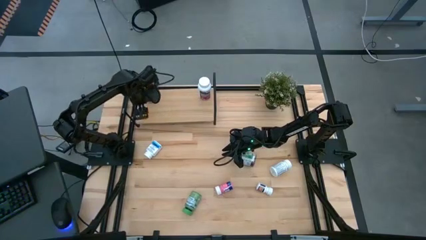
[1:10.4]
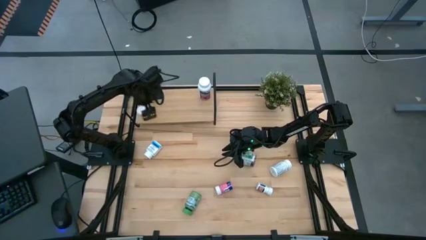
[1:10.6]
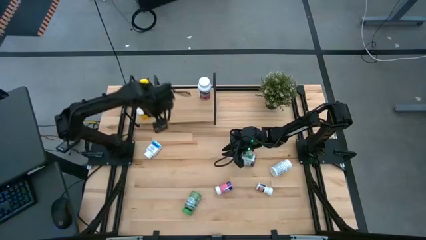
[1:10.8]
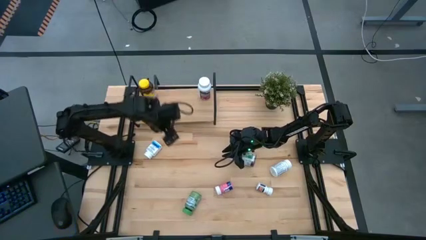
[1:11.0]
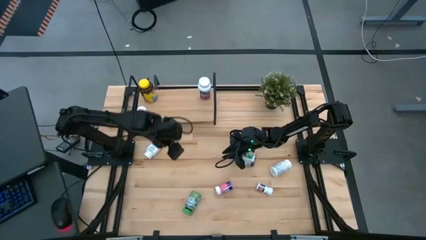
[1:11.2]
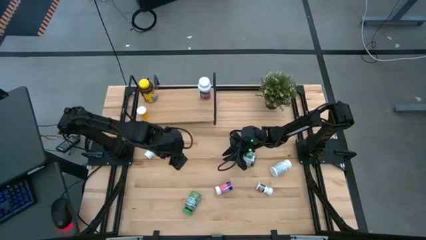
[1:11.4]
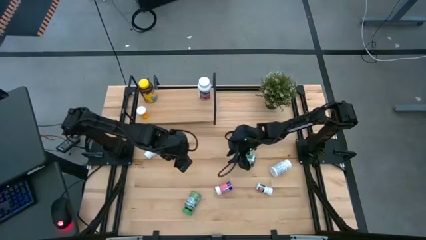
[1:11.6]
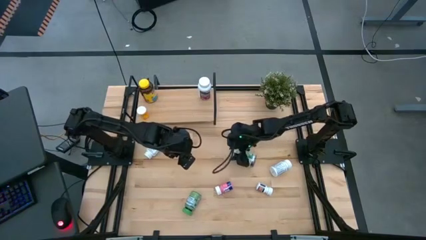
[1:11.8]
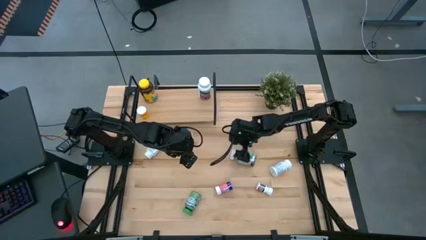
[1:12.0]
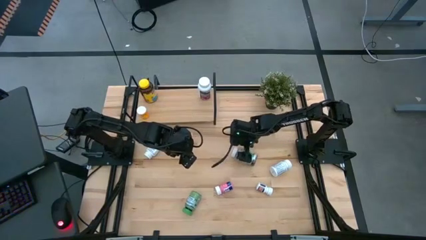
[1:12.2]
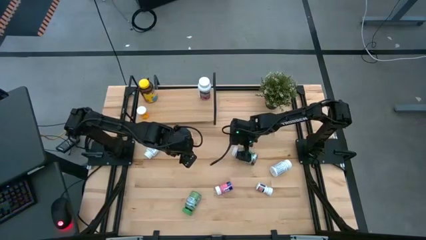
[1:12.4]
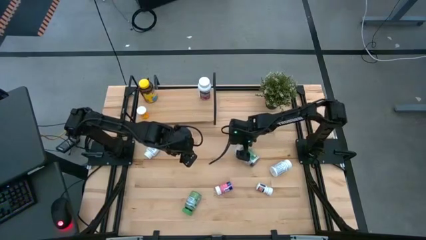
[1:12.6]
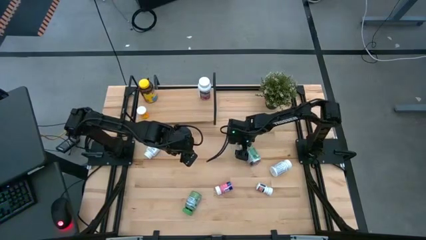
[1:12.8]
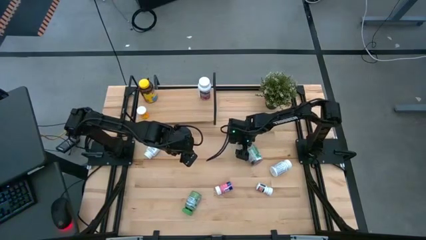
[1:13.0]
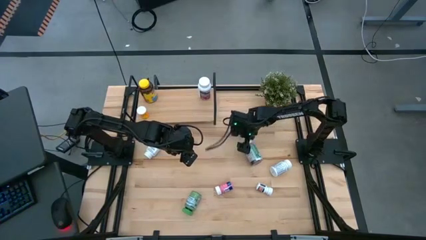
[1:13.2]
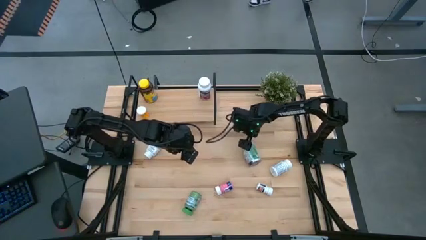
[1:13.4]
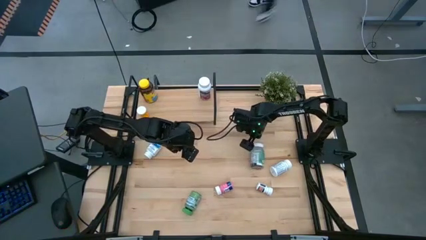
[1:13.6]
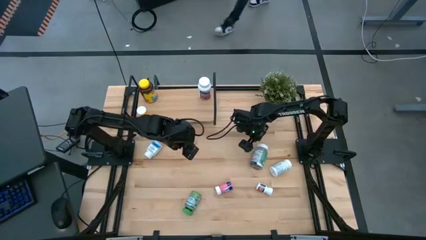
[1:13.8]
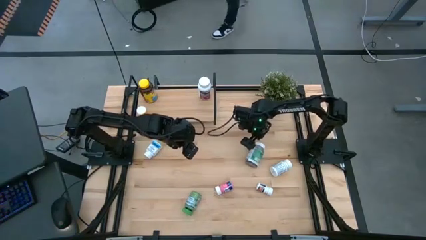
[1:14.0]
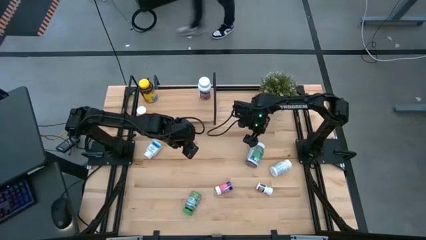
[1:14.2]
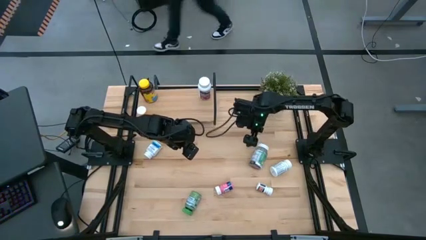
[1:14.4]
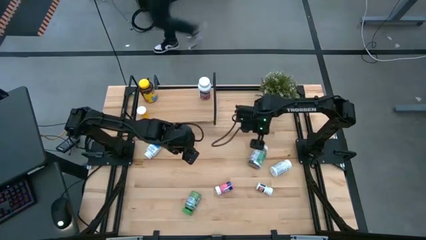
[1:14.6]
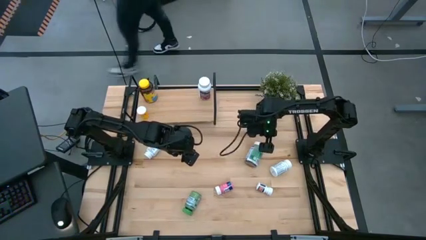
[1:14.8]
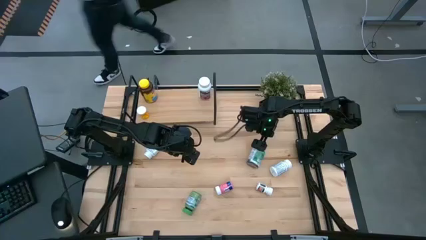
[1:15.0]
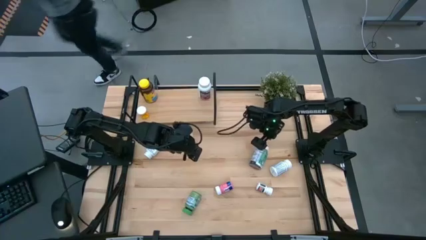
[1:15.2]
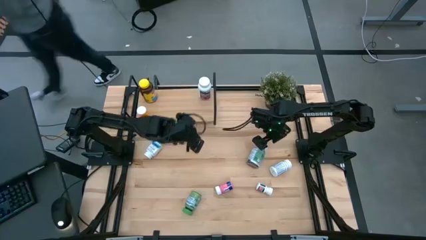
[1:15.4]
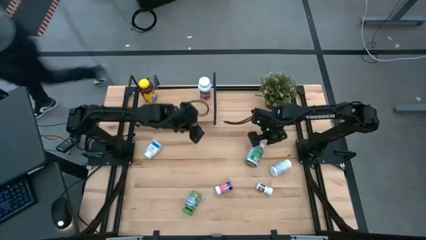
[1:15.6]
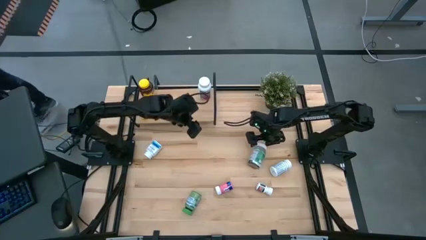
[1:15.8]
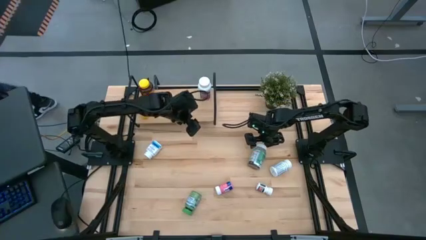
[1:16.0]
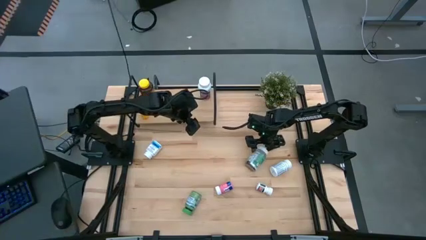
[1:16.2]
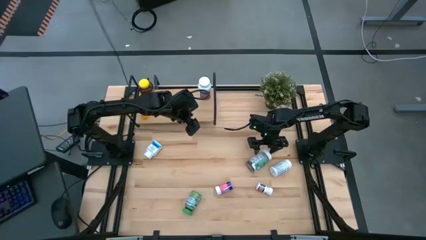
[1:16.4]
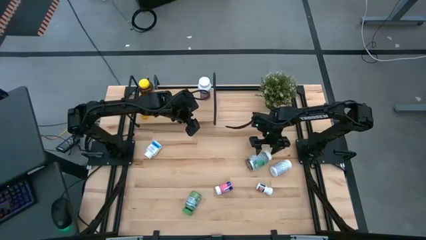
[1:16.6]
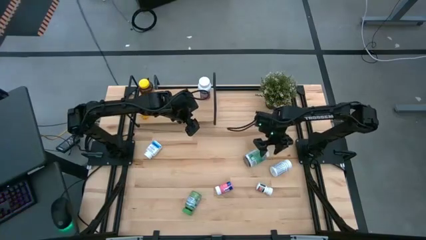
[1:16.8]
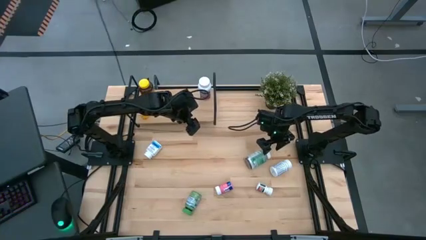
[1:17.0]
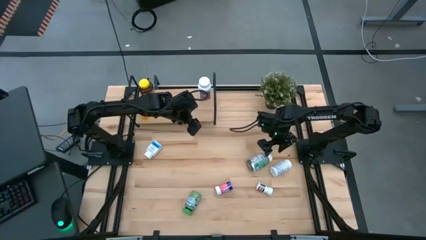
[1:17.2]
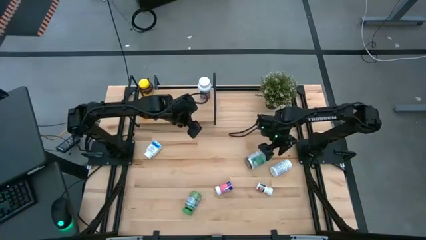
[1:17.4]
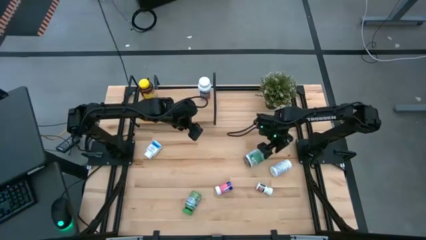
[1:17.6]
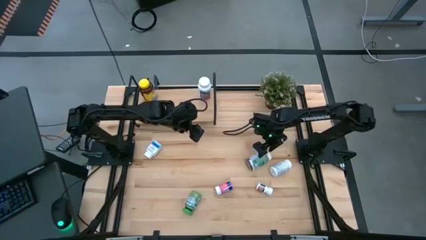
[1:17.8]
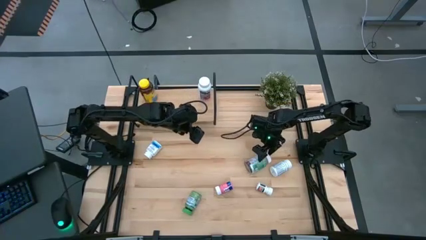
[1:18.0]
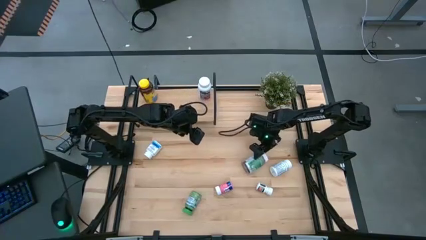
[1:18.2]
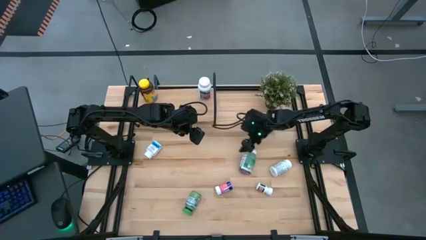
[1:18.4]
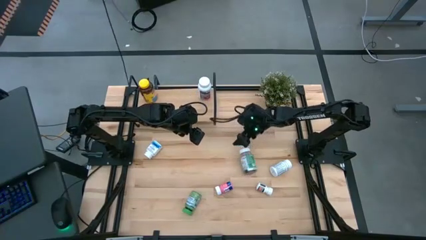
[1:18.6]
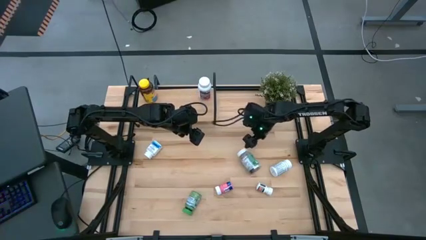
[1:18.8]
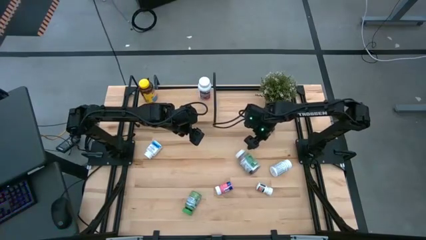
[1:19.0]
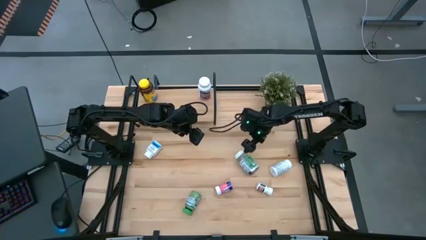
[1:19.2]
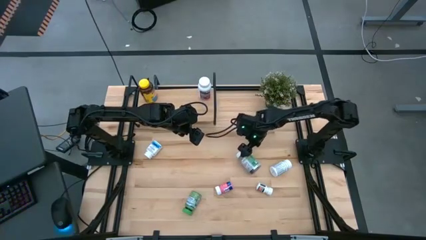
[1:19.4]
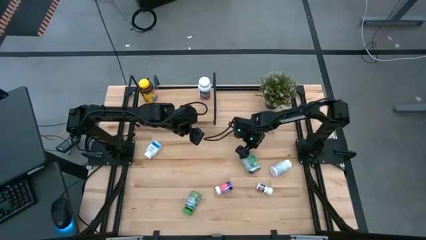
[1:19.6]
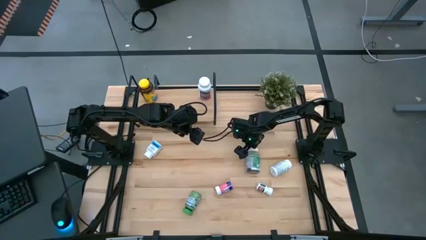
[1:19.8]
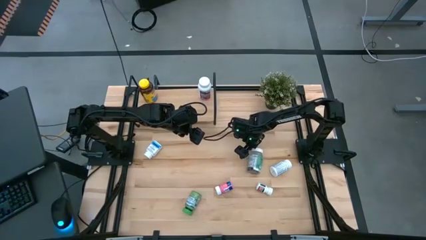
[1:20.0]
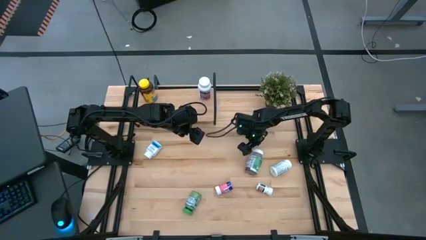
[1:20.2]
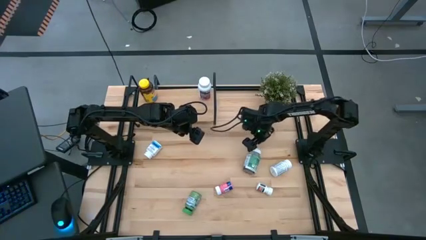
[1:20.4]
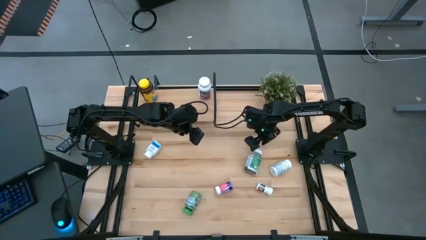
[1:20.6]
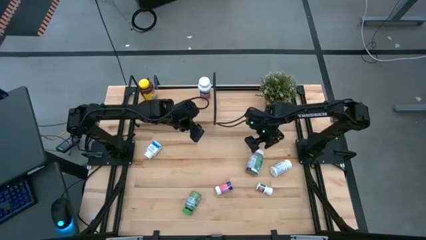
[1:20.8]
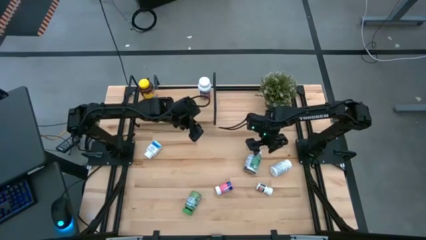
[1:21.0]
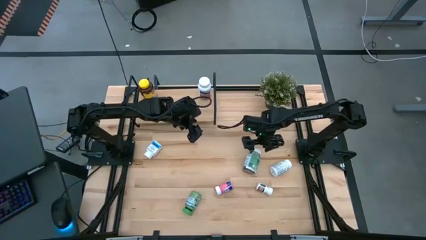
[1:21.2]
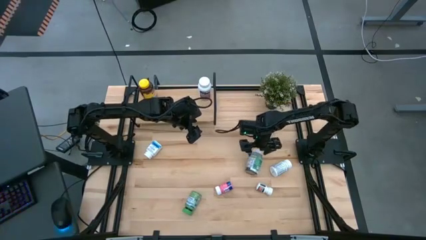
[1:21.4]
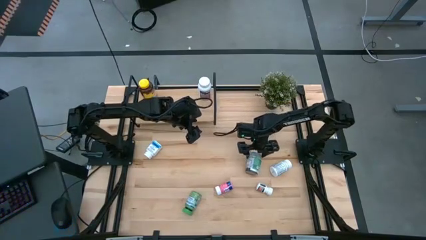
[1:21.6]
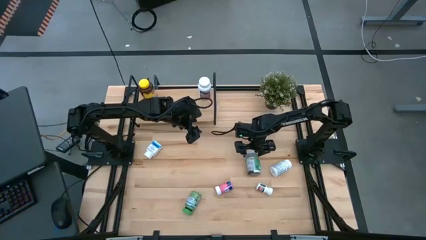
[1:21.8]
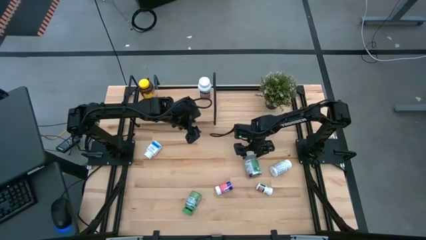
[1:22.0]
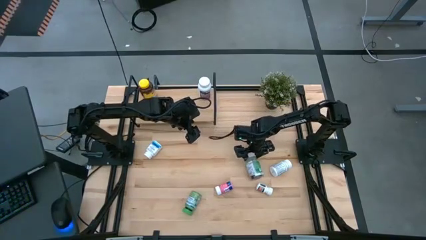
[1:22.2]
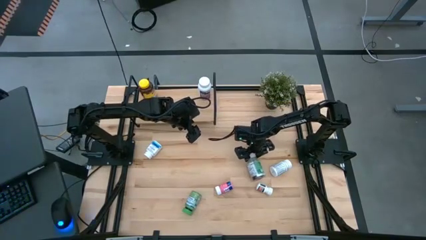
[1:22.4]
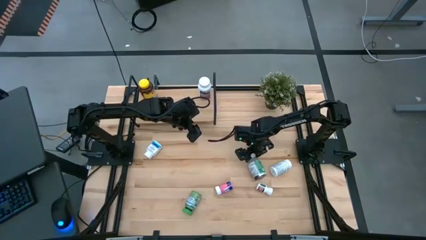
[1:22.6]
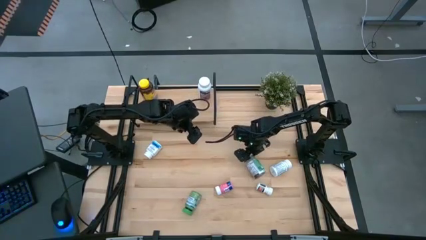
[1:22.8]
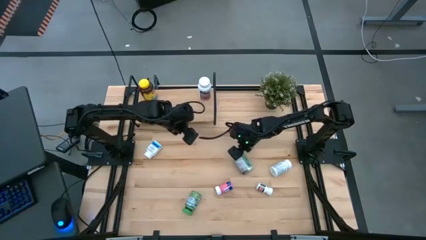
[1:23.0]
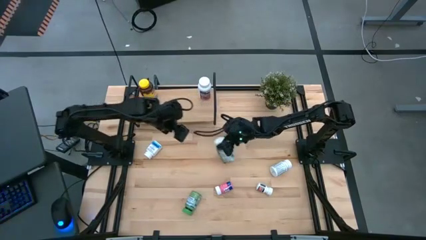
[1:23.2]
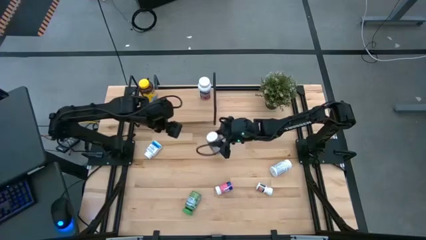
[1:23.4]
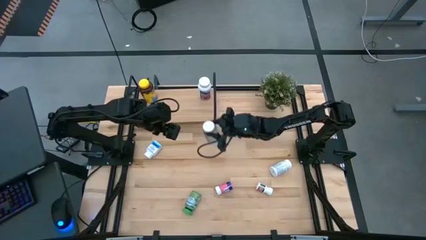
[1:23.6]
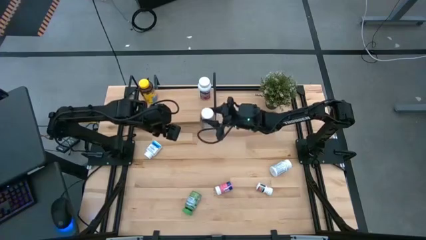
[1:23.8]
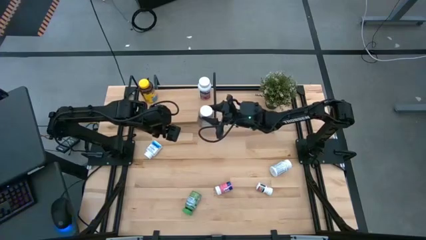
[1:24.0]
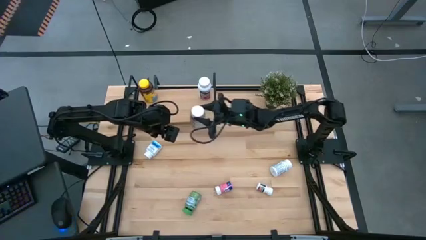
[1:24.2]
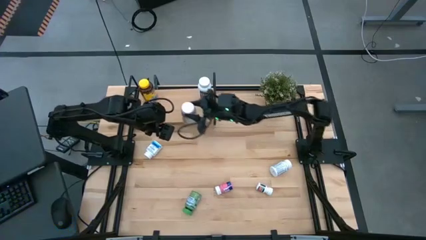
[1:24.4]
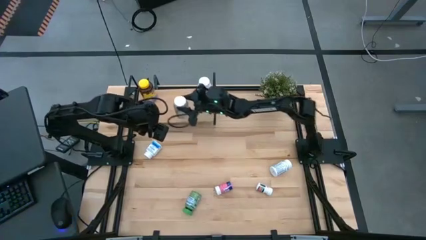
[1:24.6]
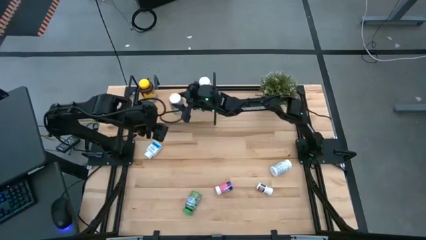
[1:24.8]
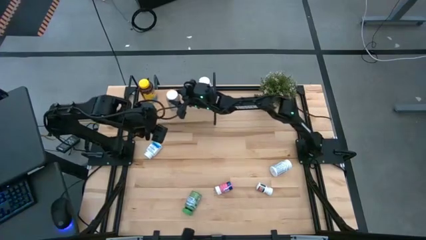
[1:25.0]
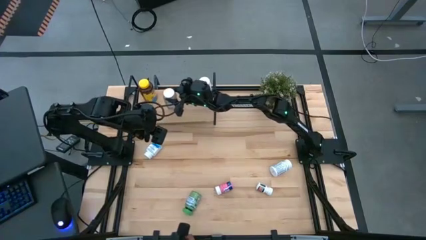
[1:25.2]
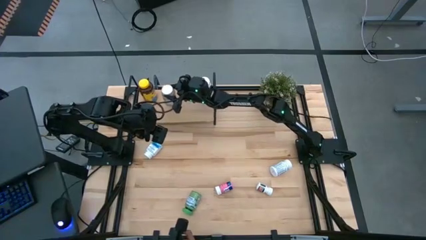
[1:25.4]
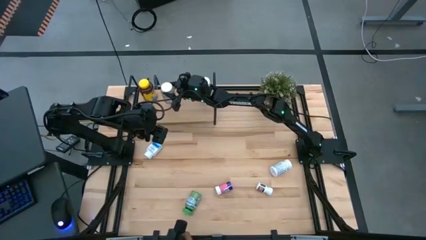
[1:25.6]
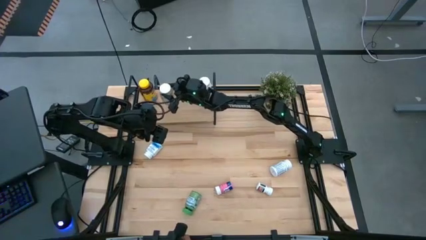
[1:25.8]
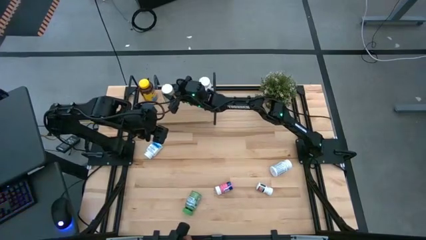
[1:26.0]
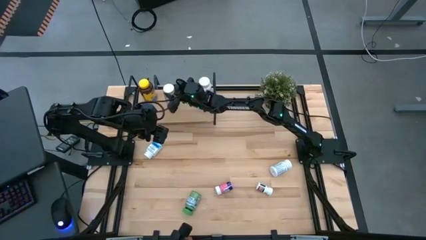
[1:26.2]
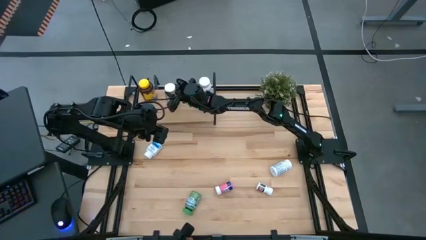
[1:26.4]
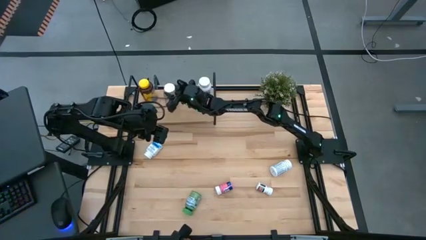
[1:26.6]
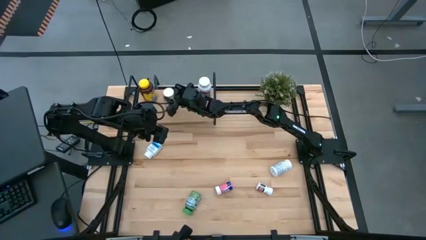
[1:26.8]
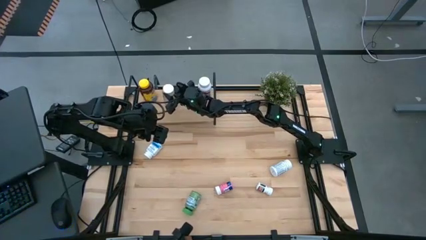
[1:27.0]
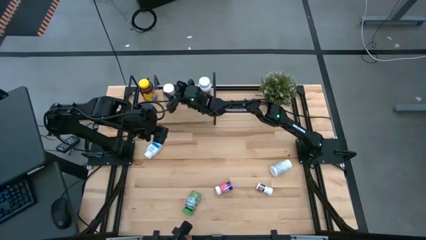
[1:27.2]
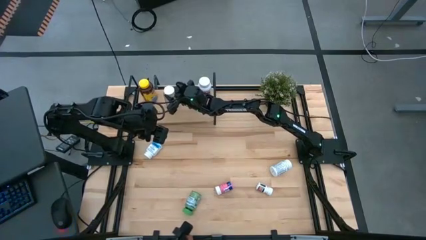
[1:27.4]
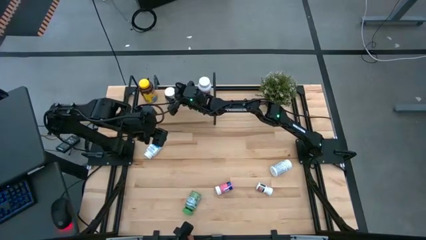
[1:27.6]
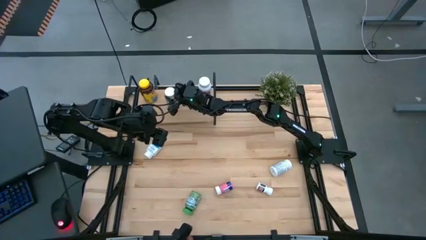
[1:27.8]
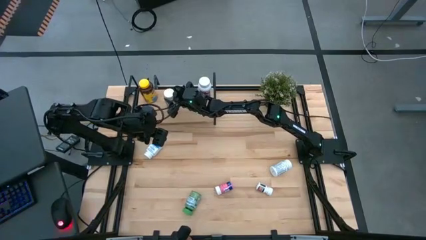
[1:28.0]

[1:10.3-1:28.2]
Task: Pick and place medicine bottles onto shelf by color
Put the green medicine bottle on the shelf
